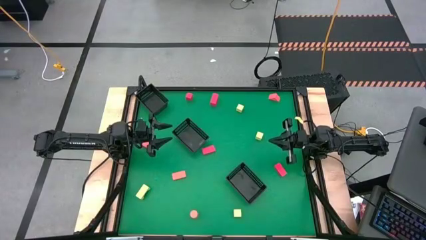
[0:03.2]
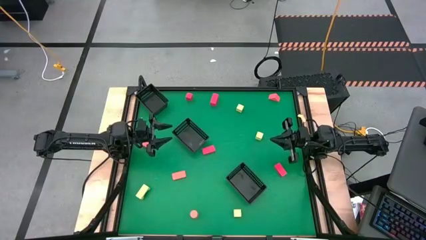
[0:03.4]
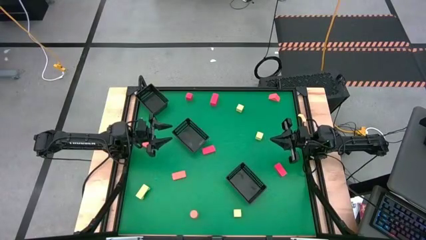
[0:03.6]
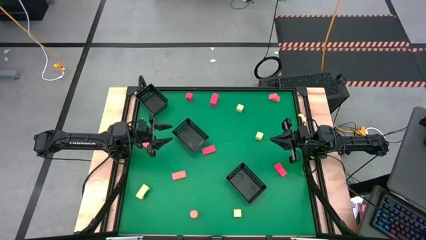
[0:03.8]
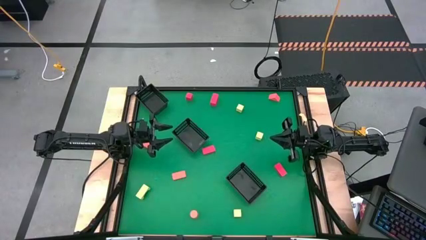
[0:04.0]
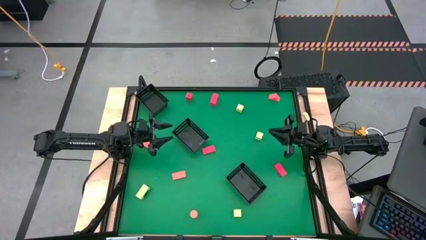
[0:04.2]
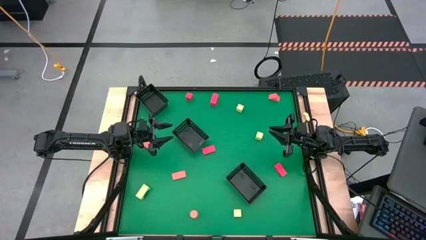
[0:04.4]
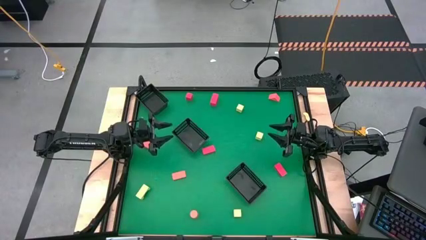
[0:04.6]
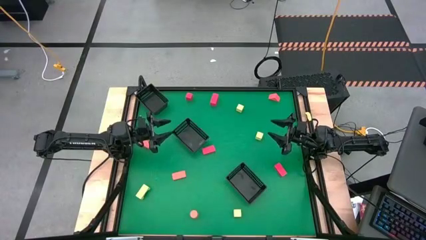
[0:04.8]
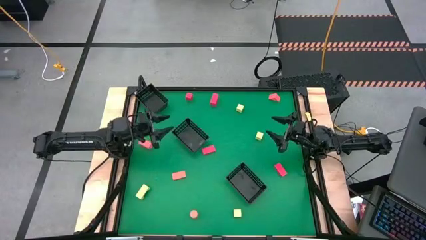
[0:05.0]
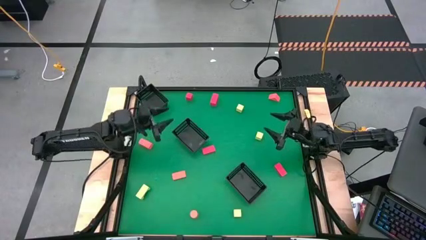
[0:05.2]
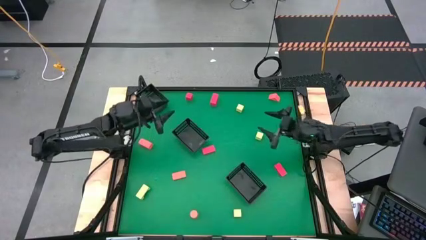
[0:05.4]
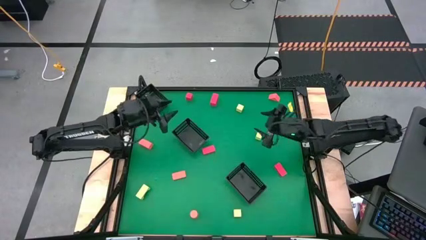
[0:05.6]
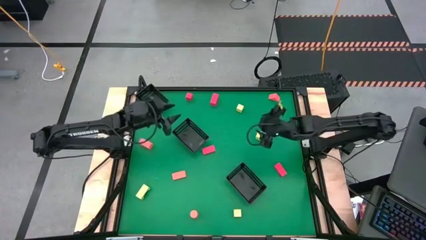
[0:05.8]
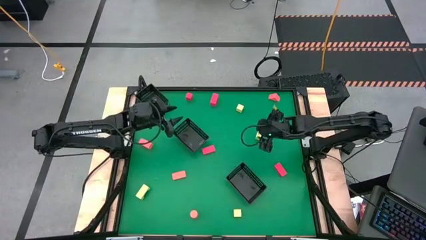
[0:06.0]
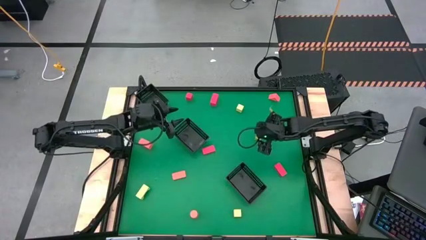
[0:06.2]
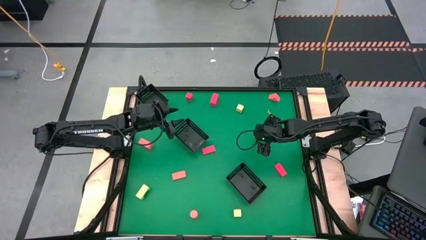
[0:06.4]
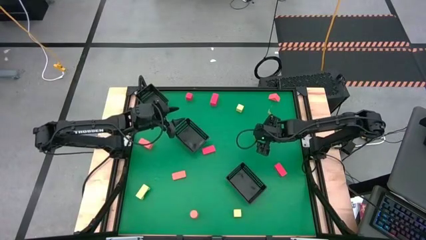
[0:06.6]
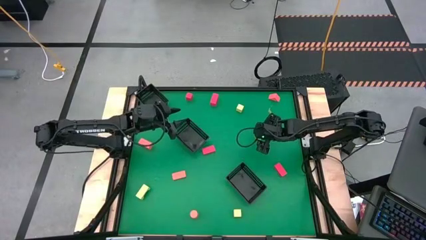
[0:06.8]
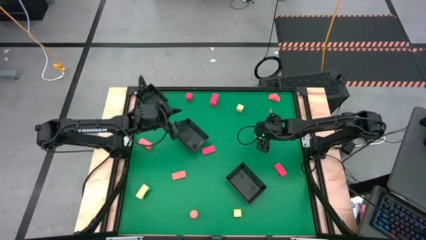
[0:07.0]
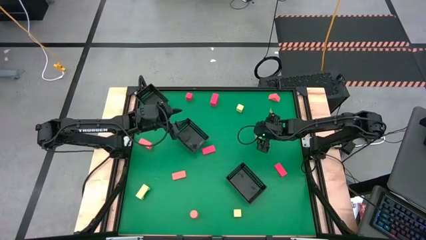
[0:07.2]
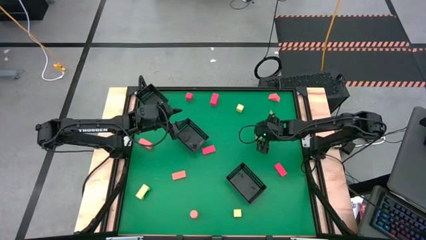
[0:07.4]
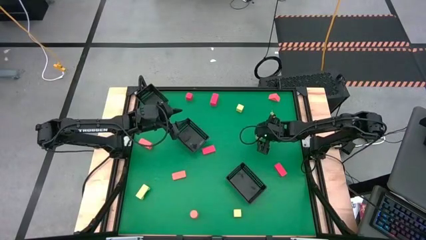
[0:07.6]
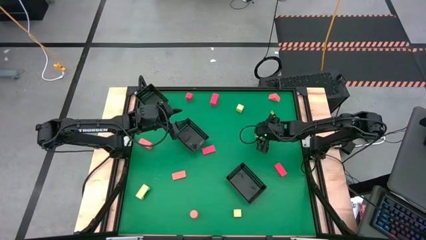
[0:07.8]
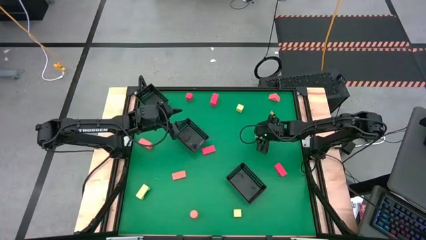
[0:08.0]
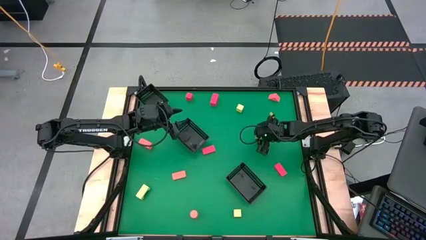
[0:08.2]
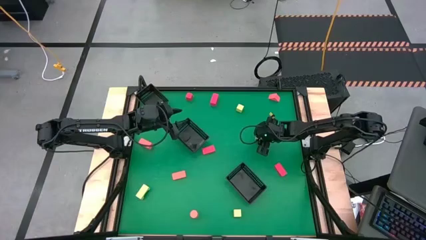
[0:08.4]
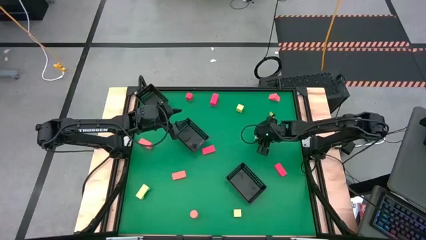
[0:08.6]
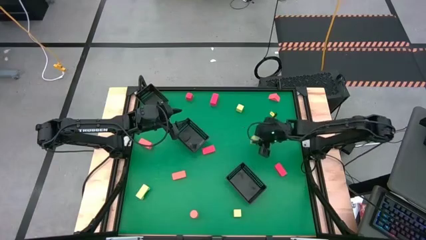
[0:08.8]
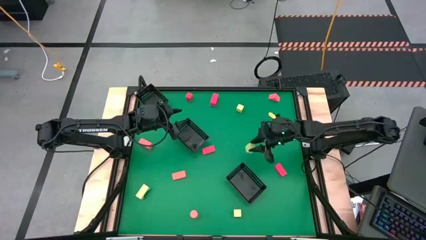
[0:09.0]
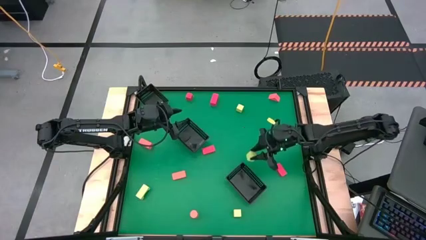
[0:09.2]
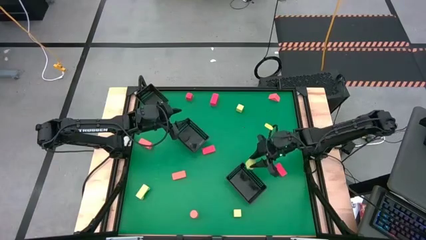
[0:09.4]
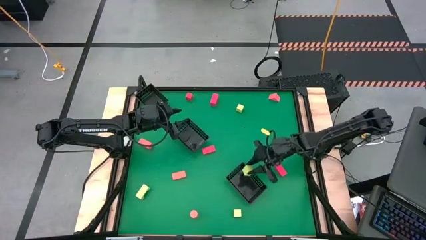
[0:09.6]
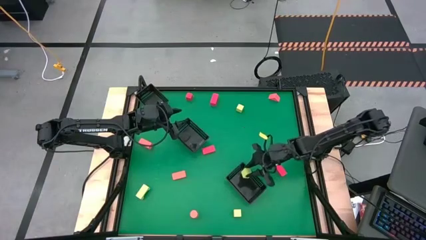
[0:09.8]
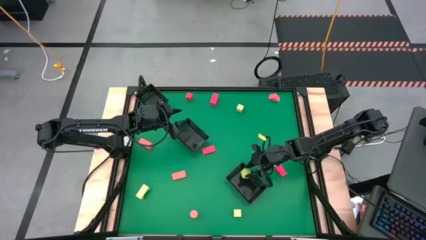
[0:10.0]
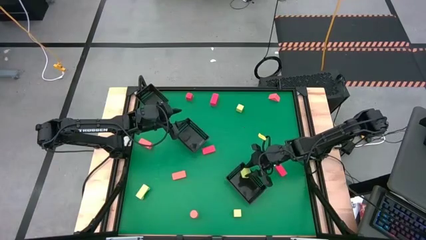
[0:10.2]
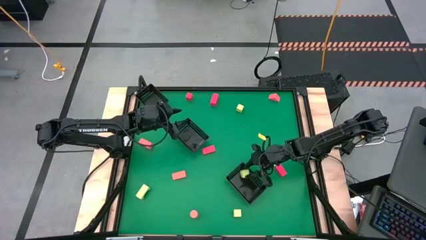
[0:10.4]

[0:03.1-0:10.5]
Task: Sort & place blocks by color
Put the light green block into the bottom black bin

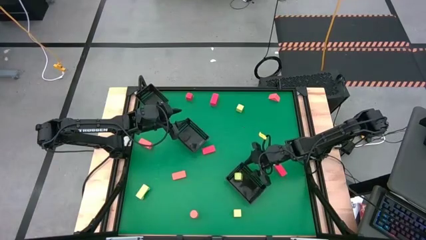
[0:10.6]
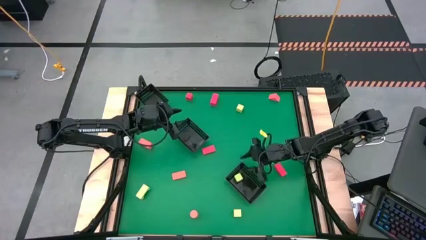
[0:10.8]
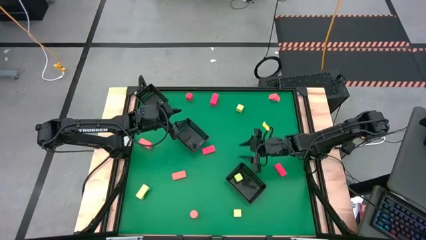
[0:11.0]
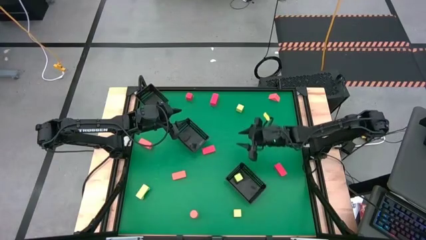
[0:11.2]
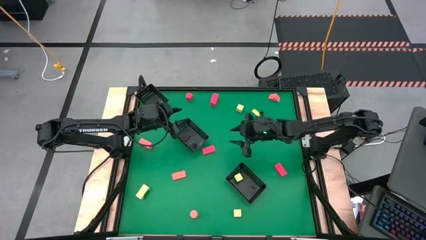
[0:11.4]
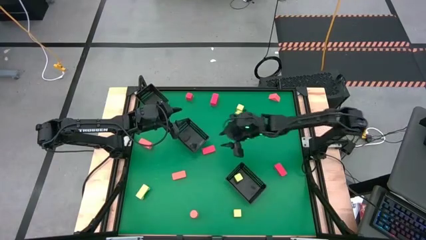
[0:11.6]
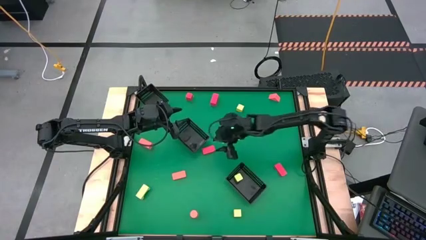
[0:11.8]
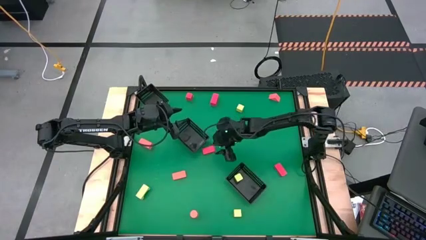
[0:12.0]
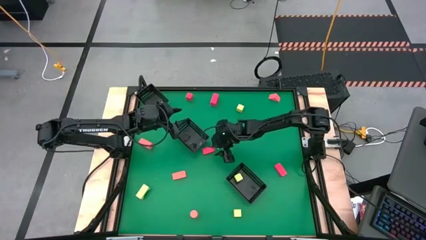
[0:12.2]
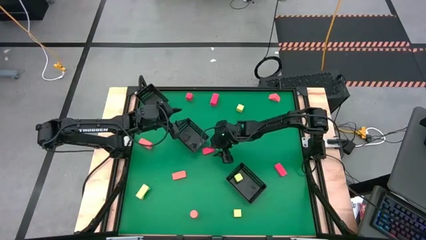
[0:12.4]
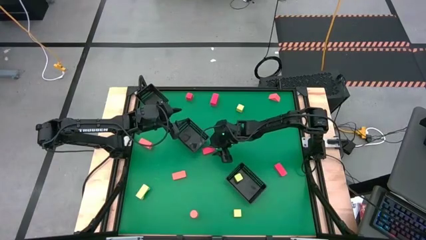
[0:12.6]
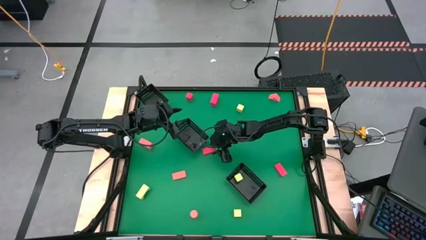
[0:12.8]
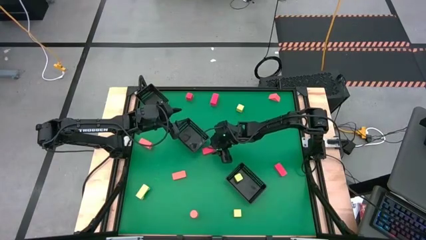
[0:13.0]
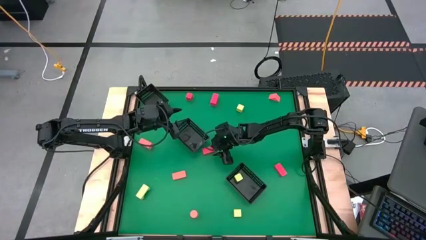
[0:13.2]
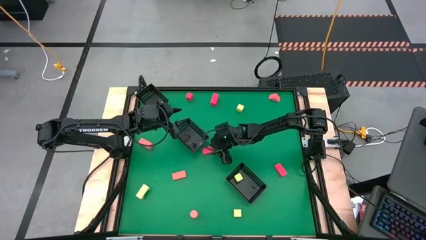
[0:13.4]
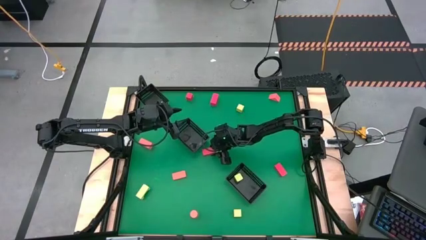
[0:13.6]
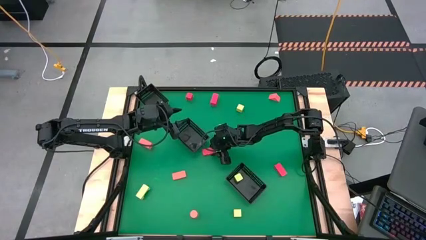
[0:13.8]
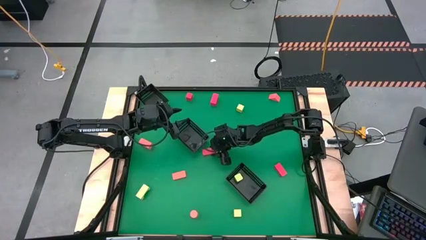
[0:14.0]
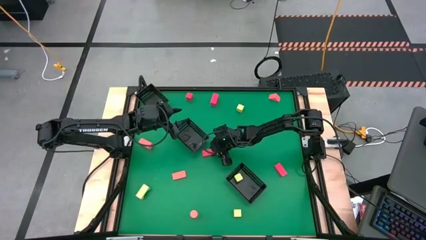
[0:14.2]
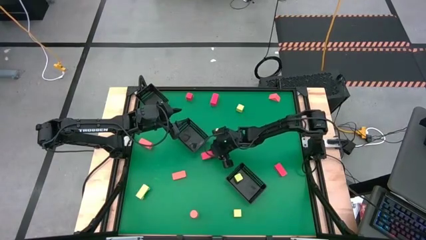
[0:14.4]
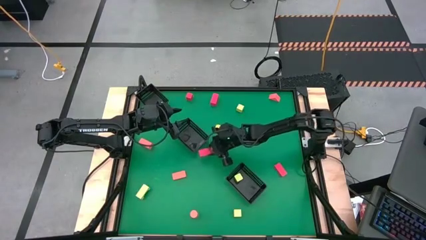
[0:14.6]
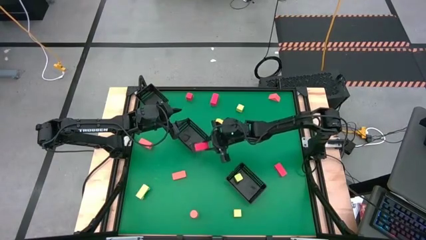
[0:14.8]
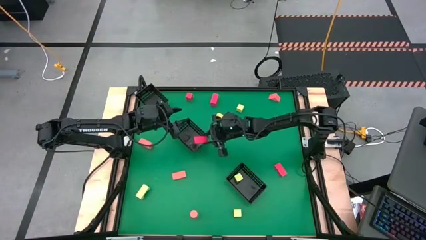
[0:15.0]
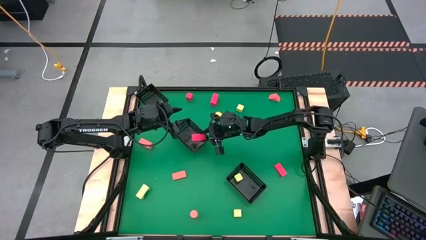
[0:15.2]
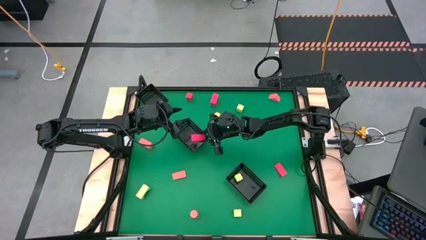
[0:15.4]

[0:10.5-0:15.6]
Put the red block into the middle black bin

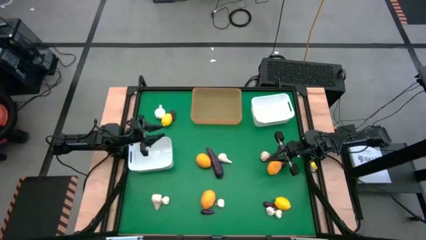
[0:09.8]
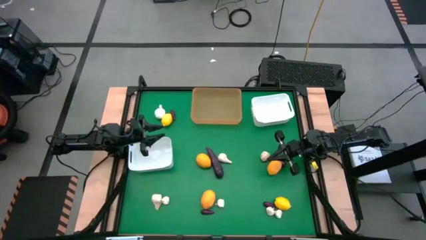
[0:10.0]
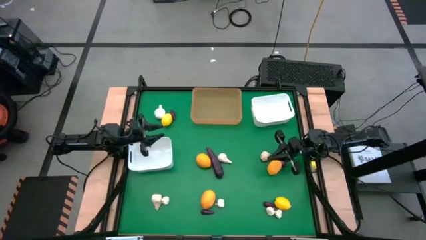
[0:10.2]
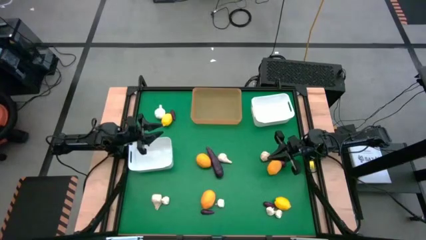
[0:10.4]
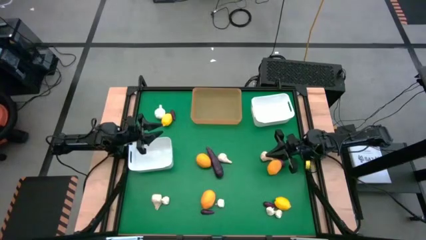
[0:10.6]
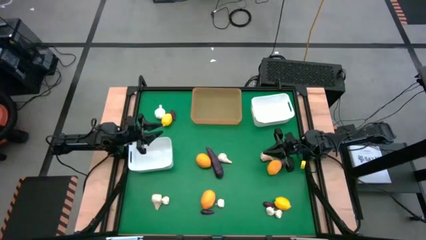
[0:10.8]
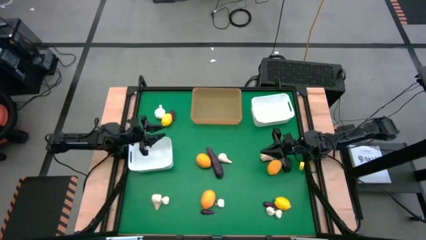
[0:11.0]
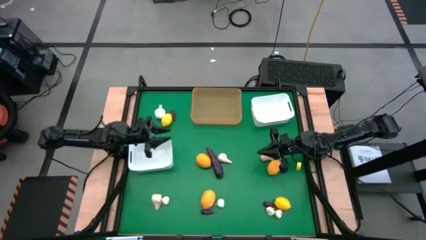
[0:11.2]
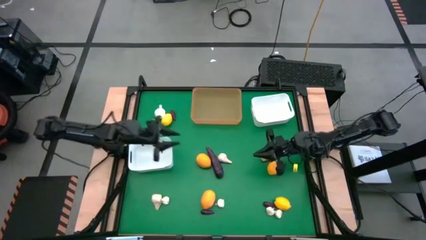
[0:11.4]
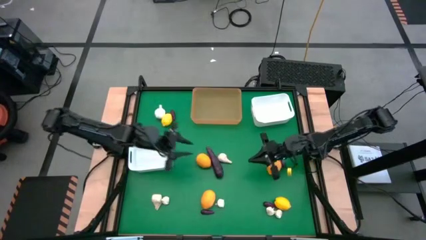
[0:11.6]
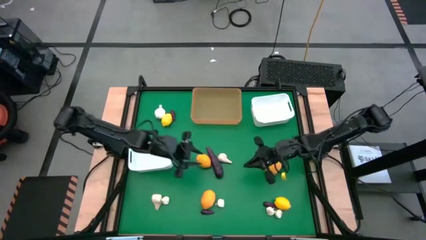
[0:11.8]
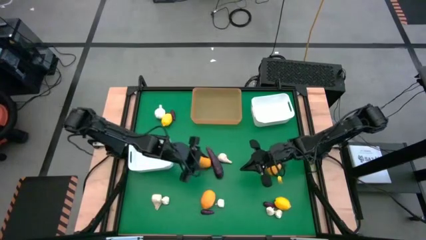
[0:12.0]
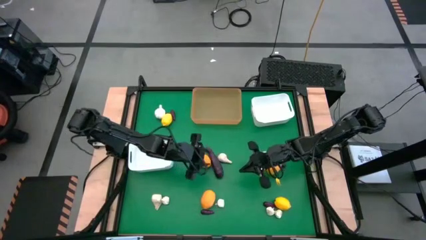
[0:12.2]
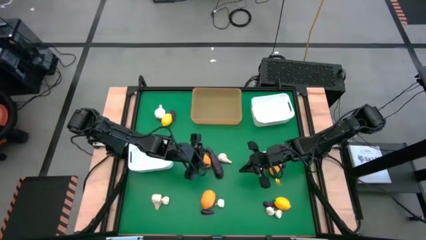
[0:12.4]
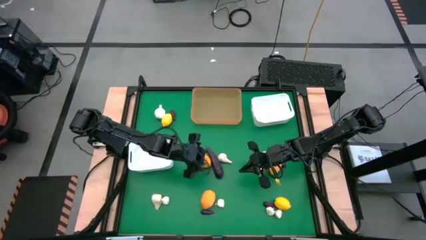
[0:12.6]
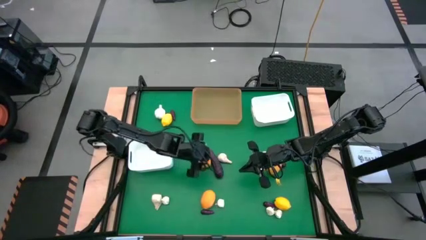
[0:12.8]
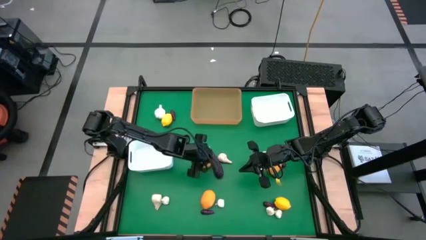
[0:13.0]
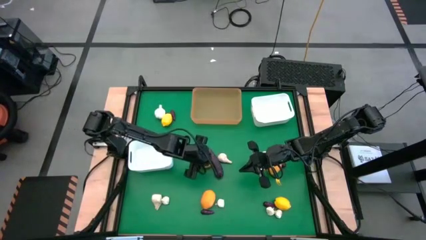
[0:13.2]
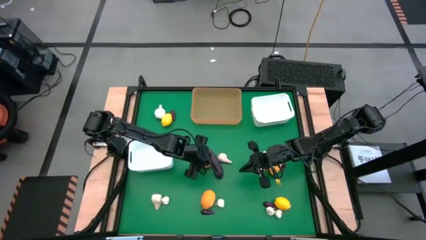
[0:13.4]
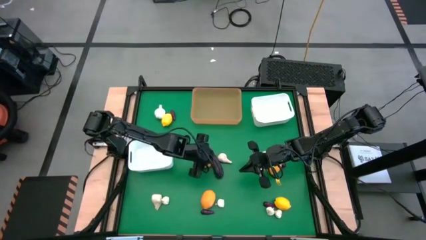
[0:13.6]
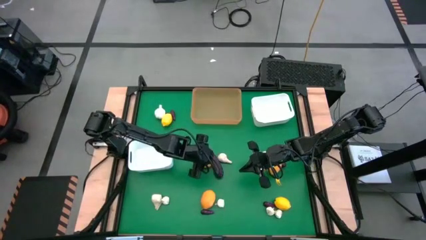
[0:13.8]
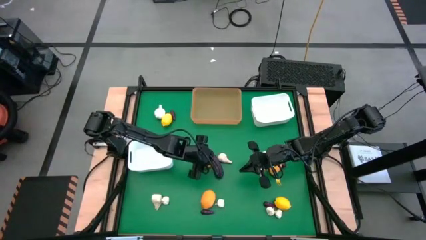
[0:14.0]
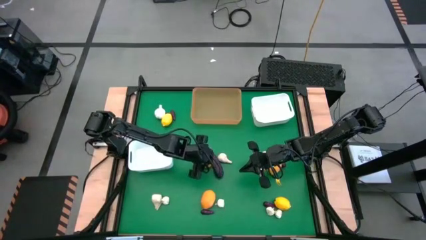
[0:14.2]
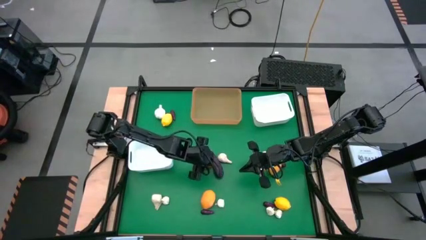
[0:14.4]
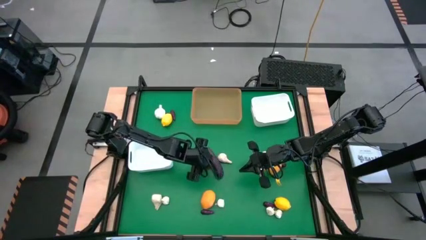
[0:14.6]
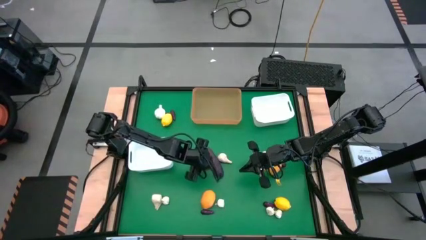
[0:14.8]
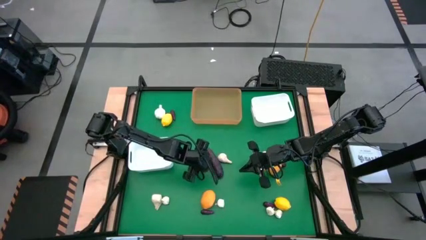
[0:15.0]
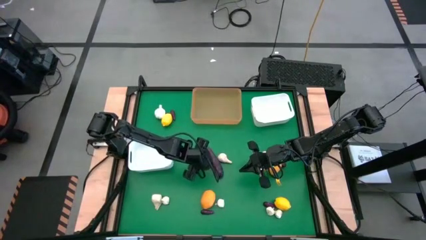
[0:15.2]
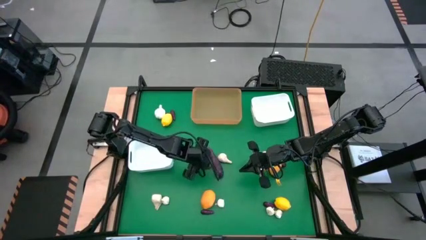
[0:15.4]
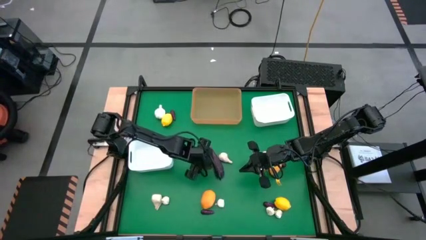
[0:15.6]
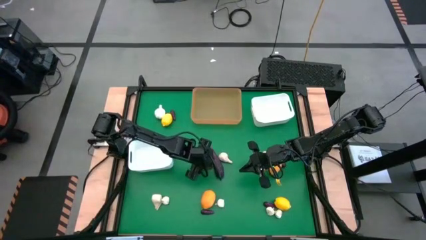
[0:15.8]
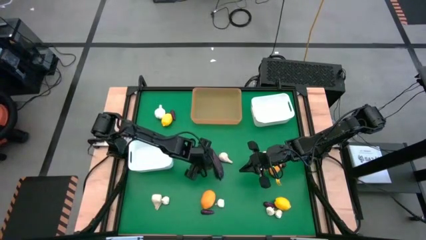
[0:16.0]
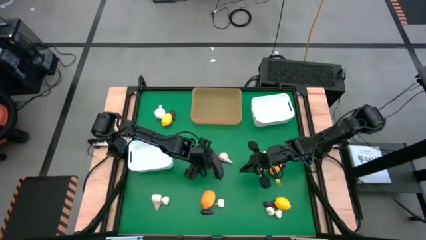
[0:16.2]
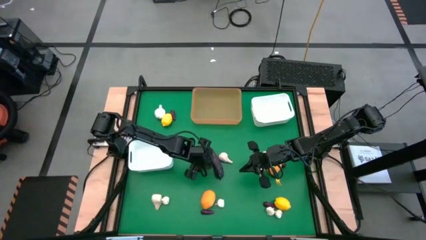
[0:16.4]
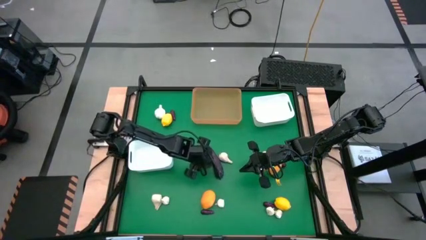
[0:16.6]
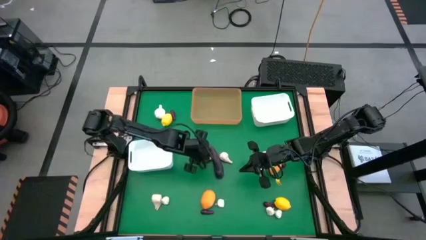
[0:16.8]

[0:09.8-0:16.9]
Task: Sort produce into baskets
Put the lemon into the yellow bin
